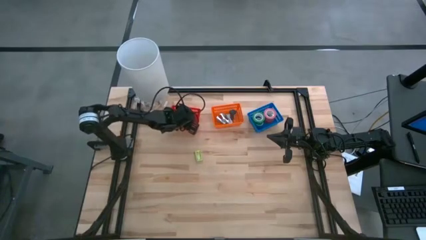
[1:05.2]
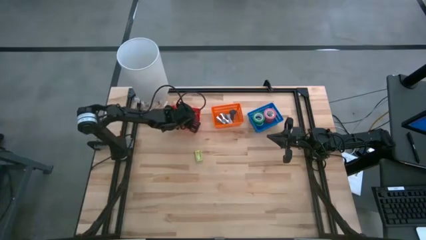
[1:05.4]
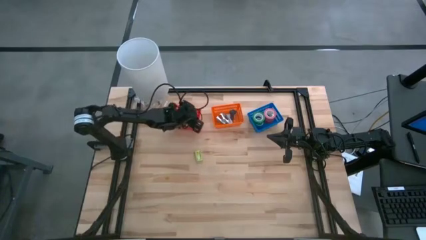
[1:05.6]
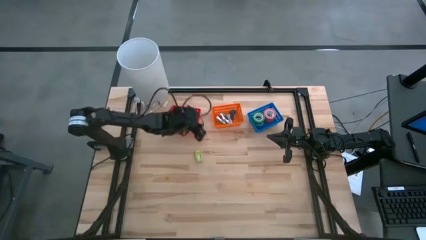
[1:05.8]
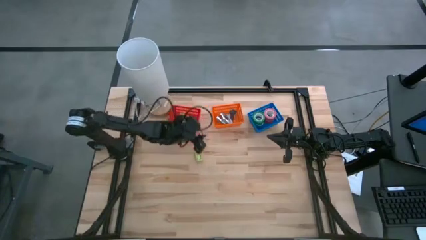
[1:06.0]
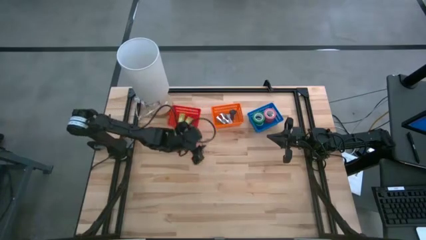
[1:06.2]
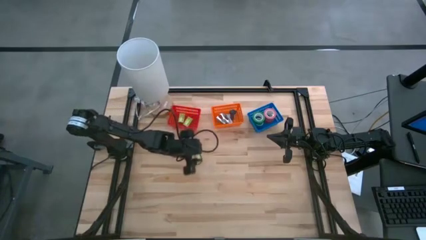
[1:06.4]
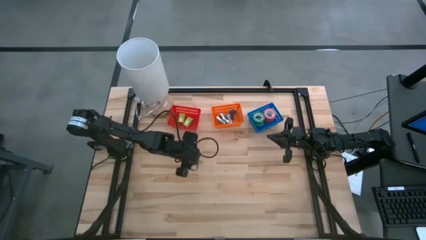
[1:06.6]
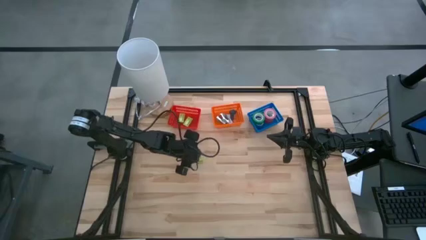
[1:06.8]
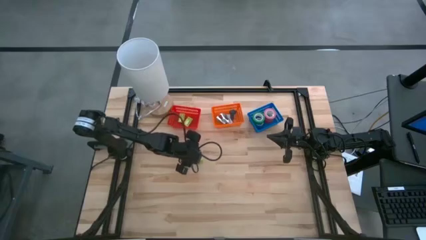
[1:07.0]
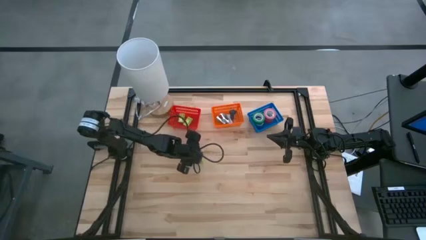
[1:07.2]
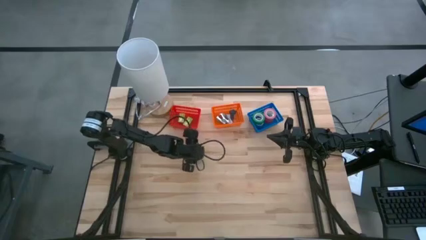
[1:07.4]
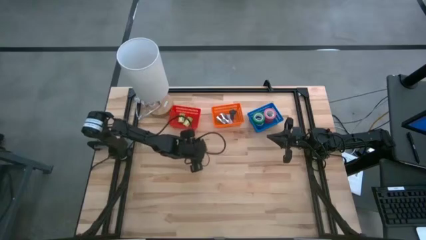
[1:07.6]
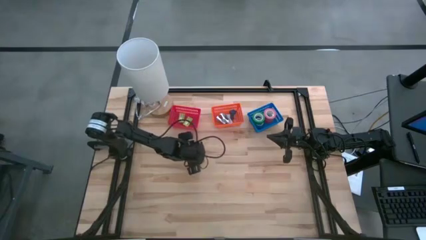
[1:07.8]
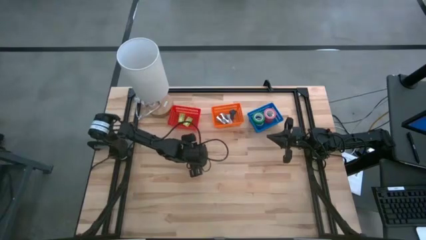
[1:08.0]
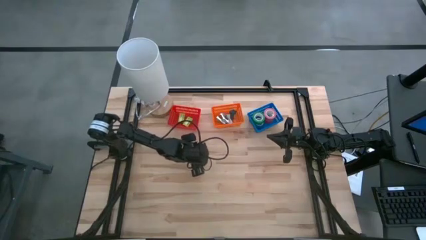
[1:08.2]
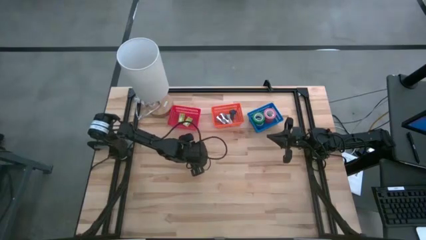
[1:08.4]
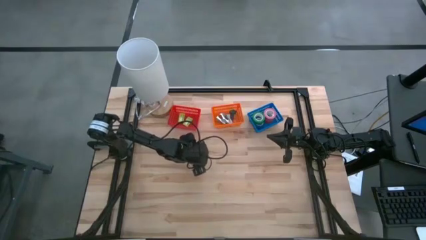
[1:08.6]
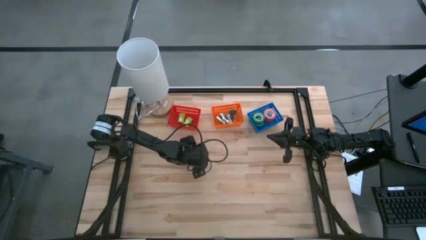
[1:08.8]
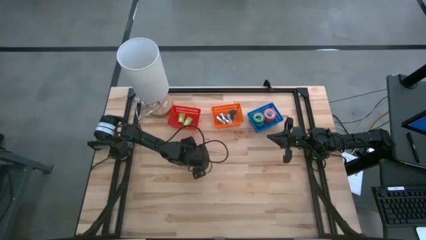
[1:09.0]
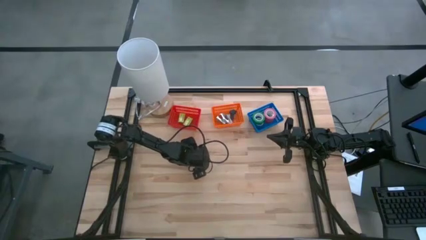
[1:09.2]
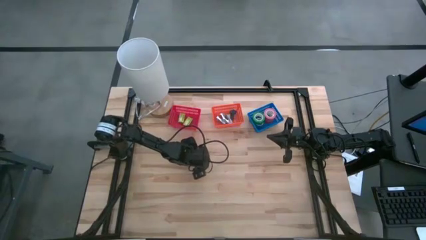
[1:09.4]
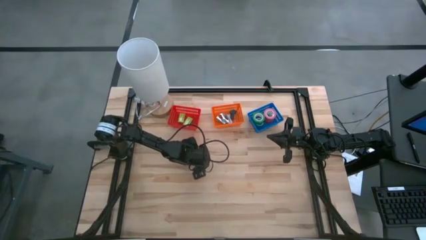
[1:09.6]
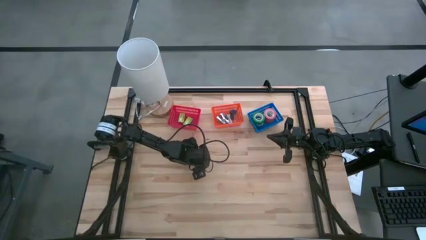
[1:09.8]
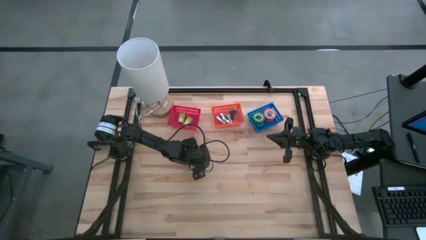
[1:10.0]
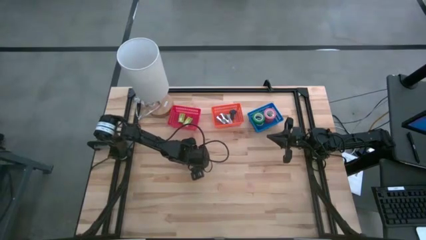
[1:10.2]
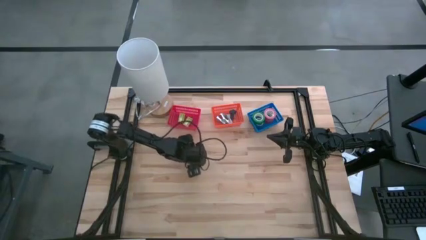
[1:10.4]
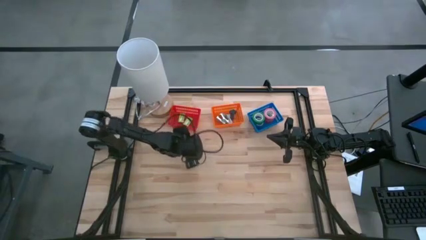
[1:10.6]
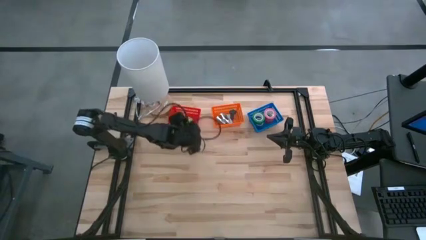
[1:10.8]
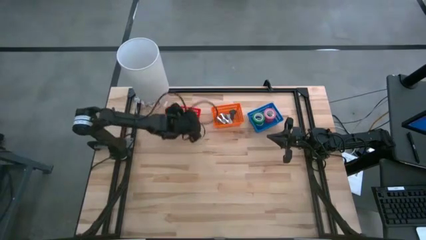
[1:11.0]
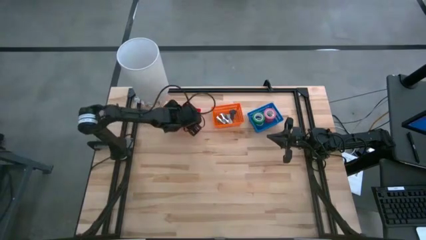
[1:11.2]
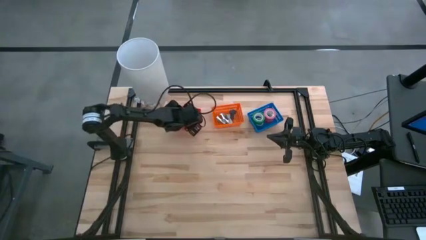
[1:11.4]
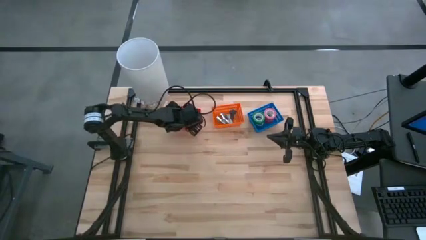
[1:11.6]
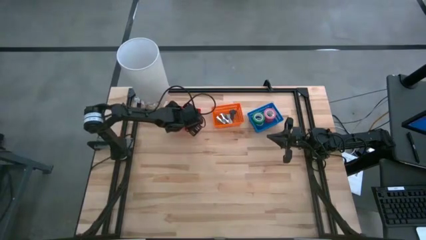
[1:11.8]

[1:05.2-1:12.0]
Task: Pick and place Stapler, Stapler remover, tape
Put the green staple box into the red bin

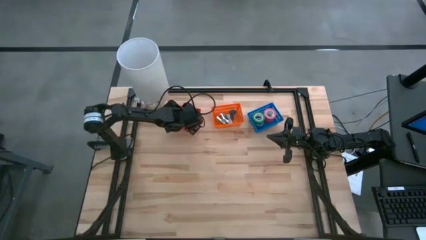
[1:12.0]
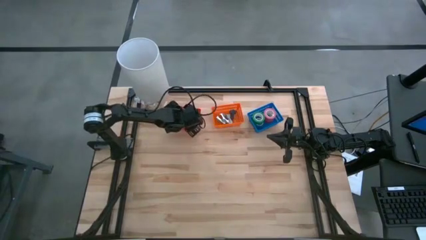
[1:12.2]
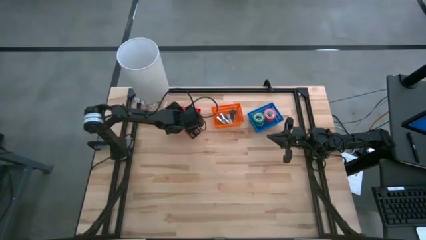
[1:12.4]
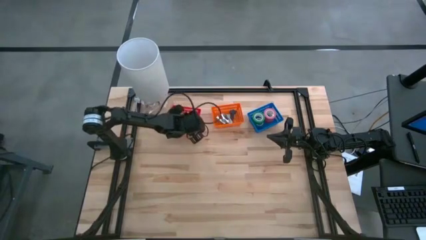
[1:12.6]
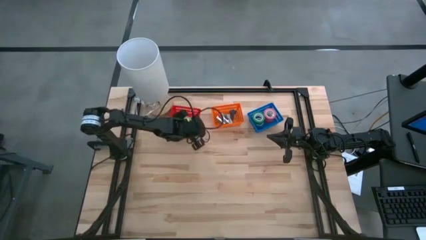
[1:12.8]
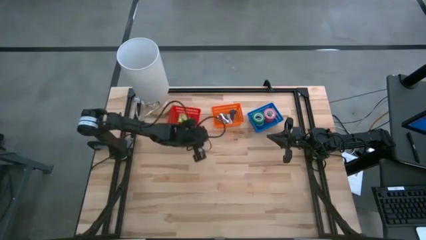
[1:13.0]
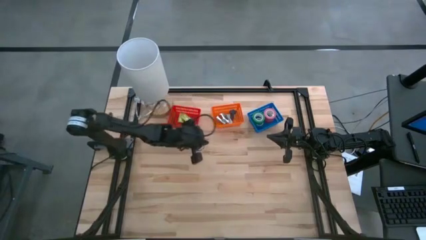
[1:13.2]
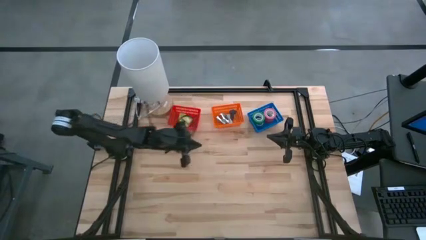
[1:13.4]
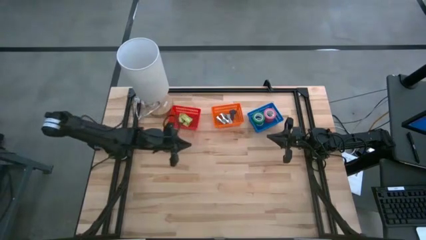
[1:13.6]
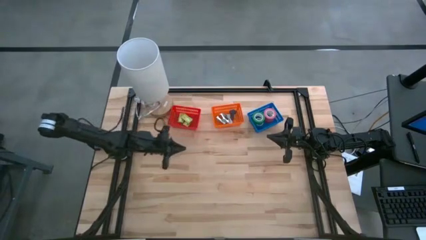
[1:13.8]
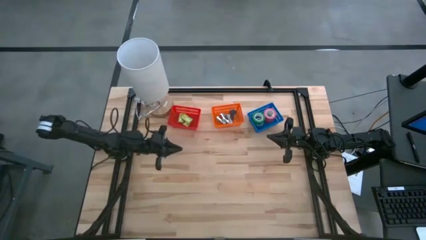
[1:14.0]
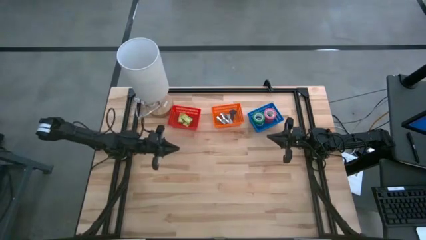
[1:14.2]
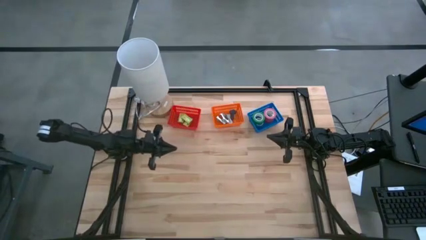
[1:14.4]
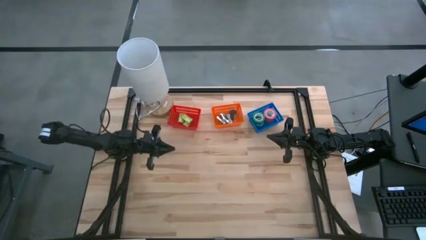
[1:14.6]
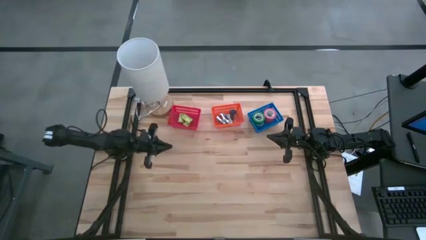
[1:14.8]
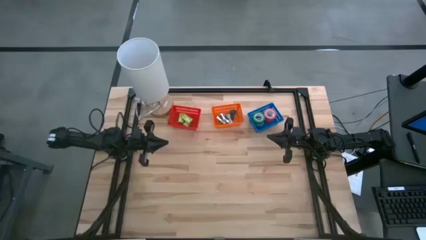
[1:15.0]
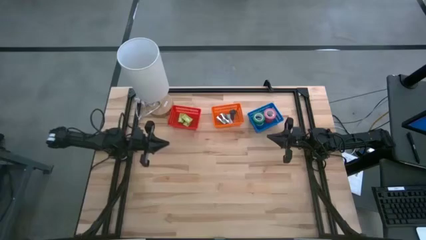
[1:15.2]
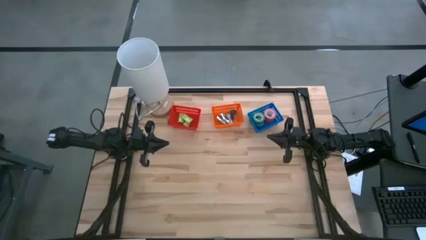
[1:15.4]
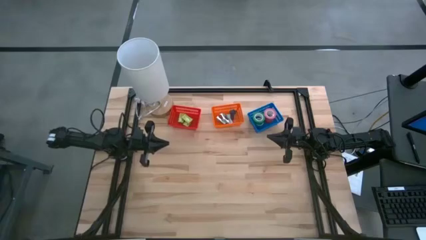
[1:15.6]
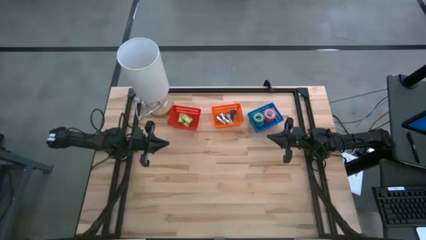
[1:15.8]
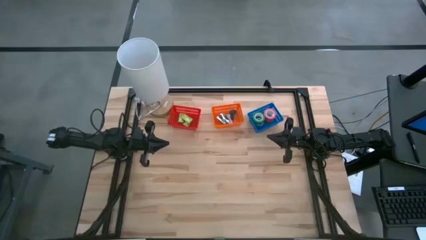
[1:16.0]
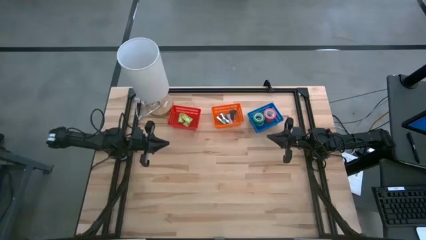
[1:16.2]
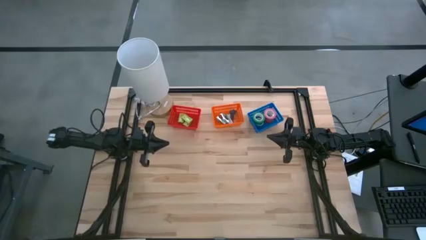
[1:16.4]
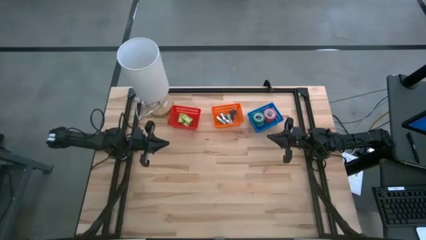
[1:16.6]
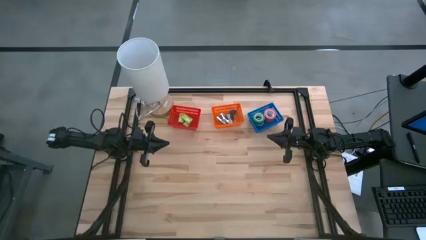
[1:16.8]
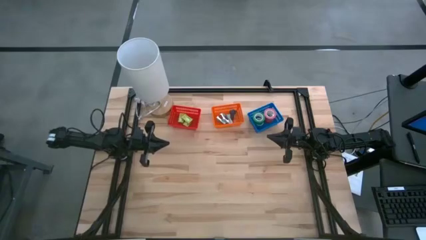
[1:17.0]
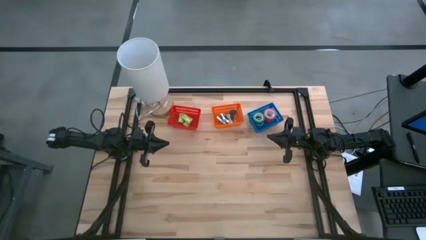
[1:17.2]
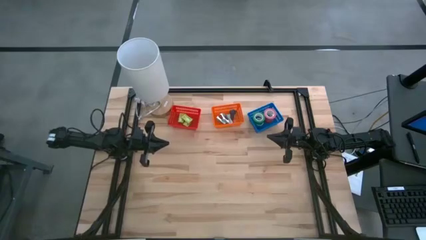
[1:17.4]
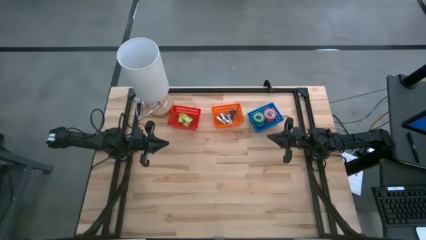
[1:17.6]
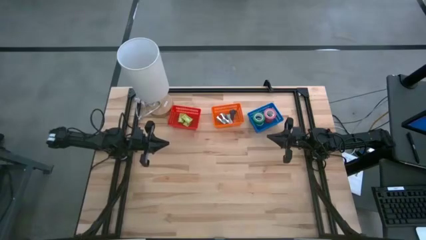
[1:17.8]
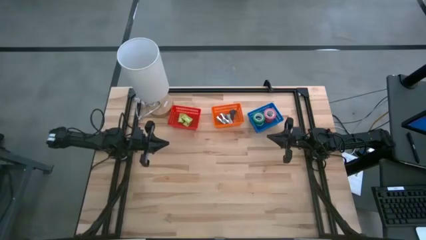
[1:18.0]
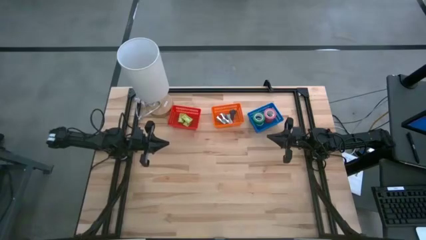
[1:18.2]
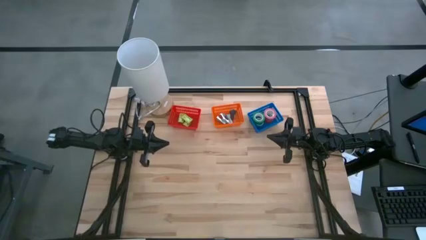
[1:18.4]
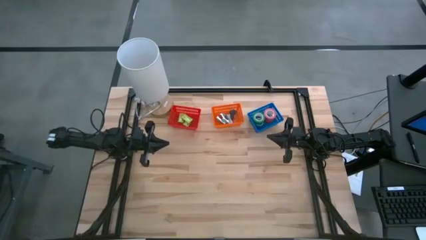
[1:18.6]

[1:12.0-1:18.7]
Return to Home Position

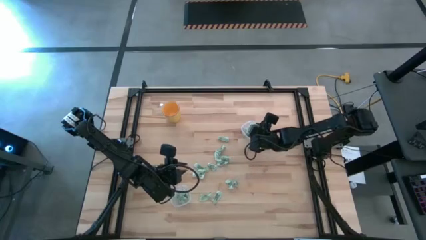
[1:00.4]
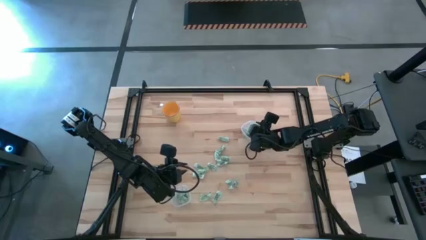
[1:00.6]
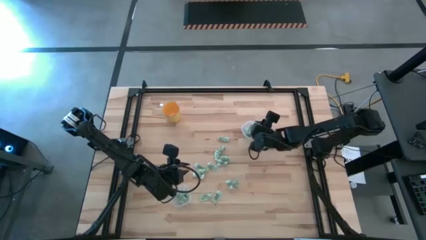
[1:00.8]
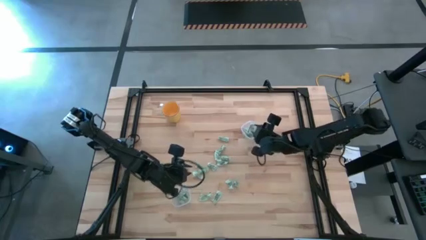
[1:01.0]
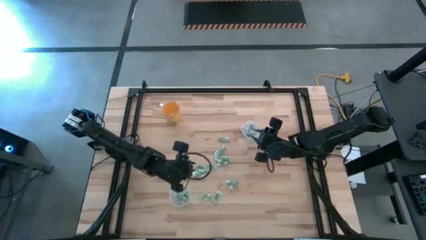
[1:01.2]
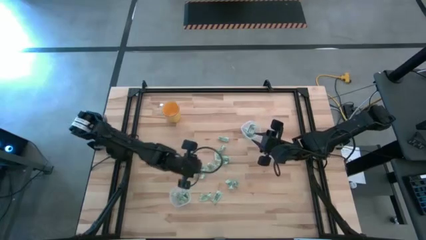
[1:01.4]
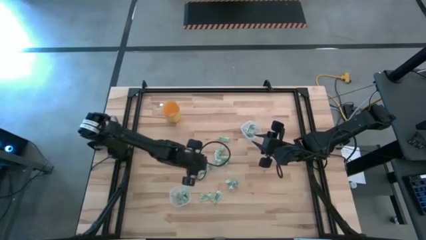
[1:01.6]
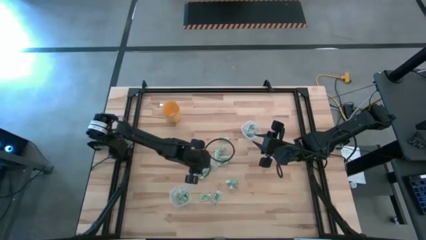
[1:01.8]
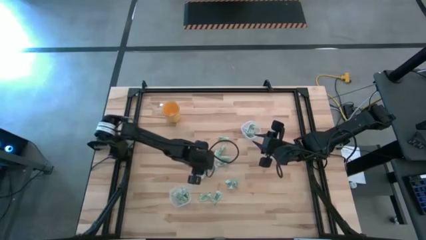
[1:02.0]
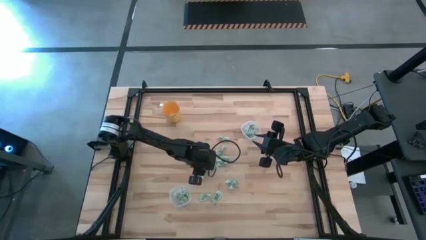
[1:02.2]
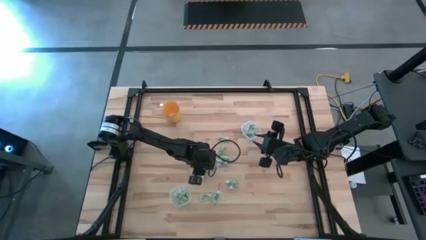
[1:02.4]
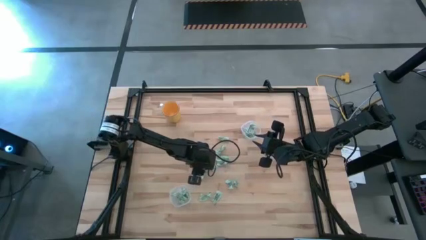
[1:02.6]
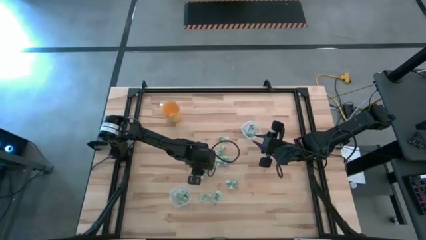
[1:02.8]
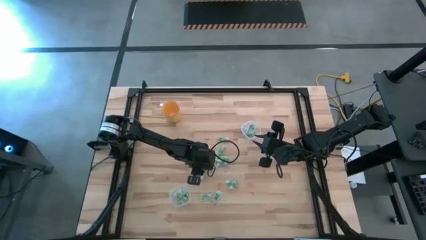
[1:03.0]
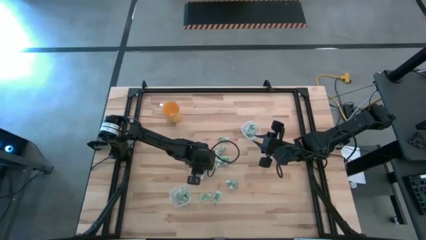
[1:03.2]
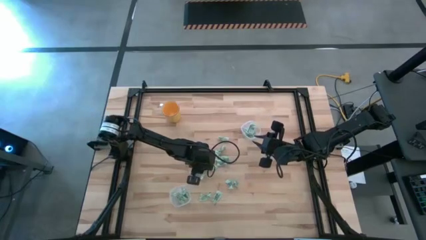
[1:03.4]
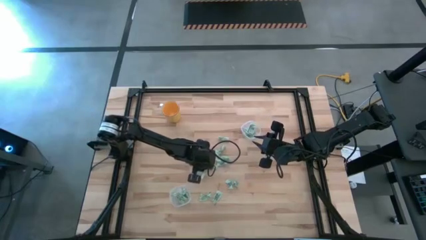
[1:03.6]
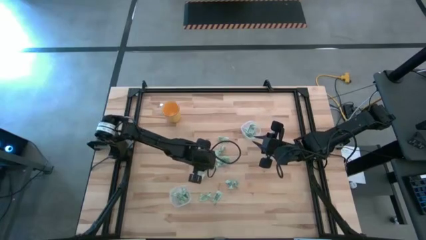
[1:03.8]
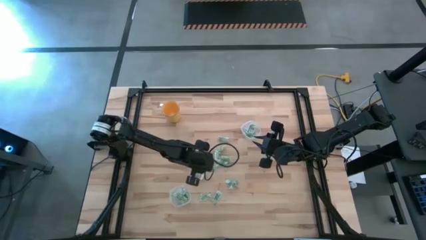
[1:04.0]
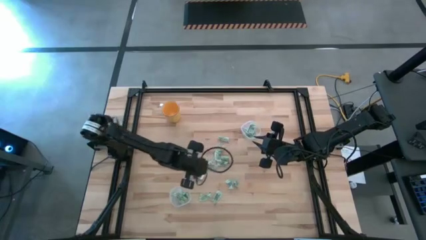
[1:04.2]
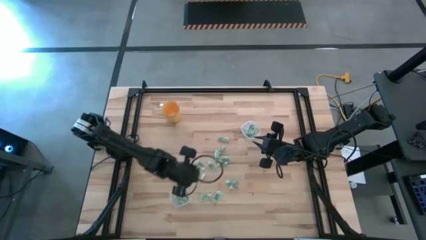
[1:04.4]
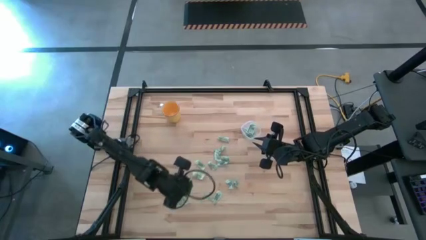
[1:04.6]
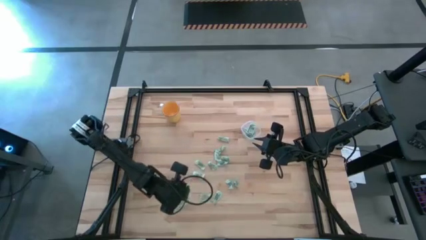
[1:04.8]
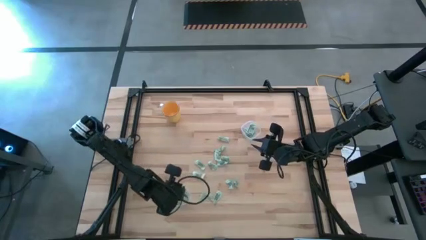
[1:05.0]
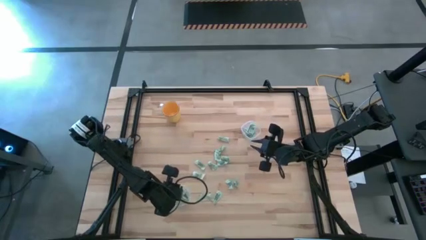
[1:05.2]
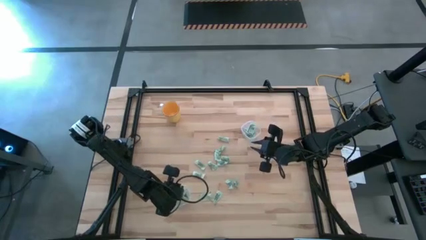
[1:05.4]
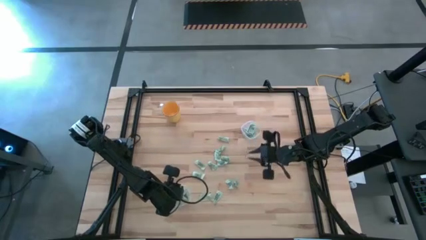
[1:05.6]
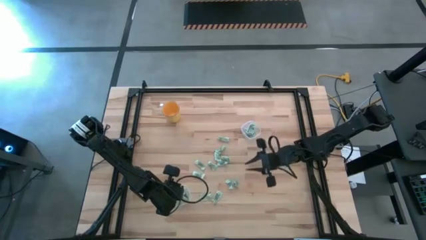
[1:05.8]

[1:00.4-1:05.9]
Task: Pick and place Stevia / Truvia into bins
Put the green stevia packet into the bottom transparent container
